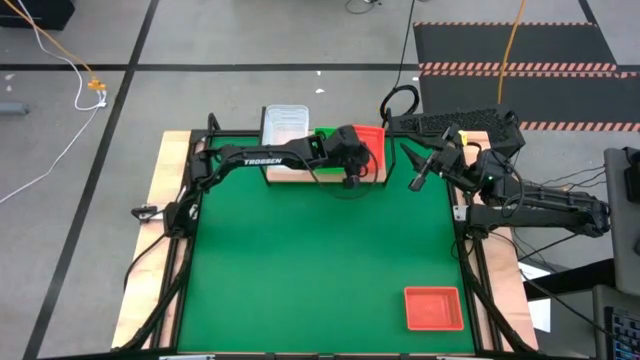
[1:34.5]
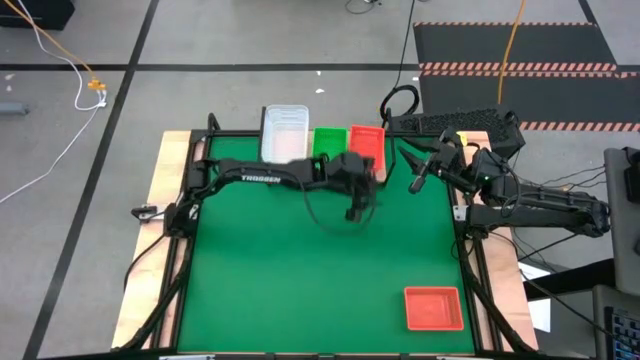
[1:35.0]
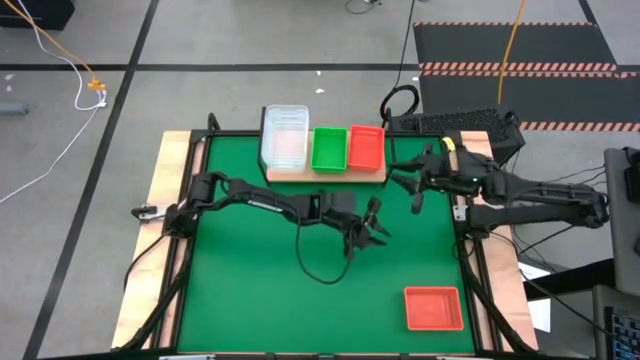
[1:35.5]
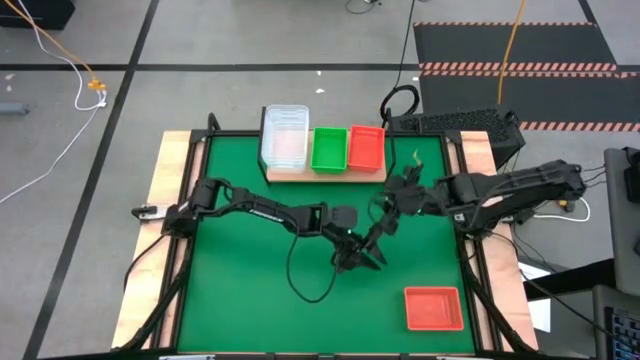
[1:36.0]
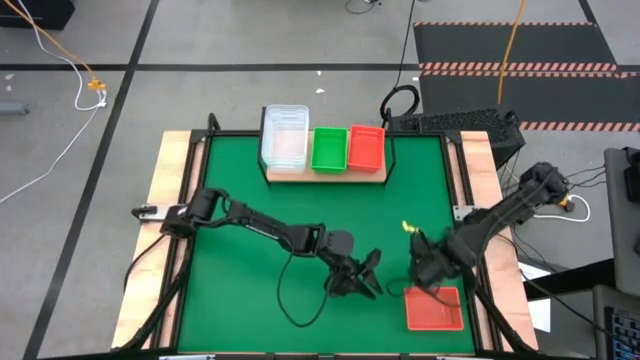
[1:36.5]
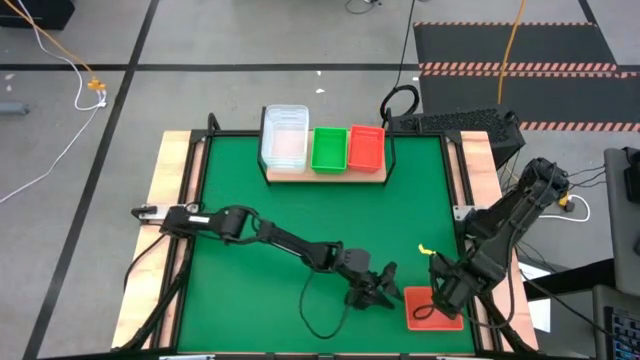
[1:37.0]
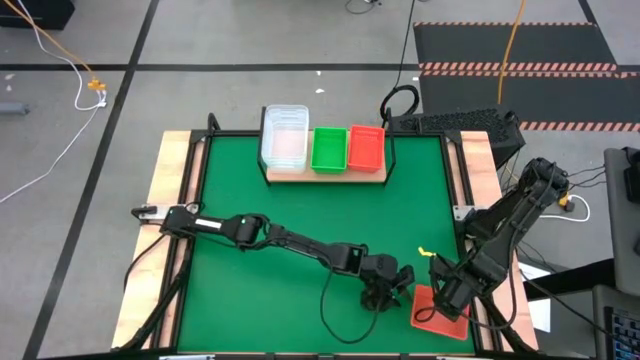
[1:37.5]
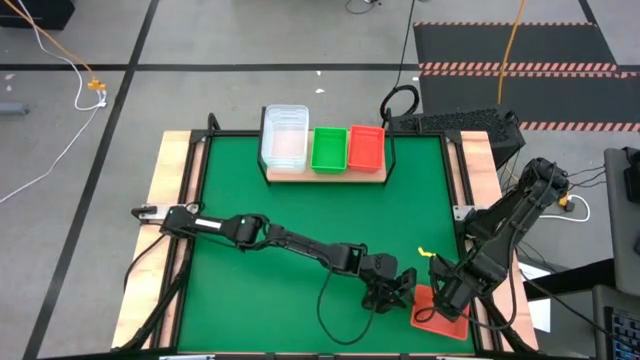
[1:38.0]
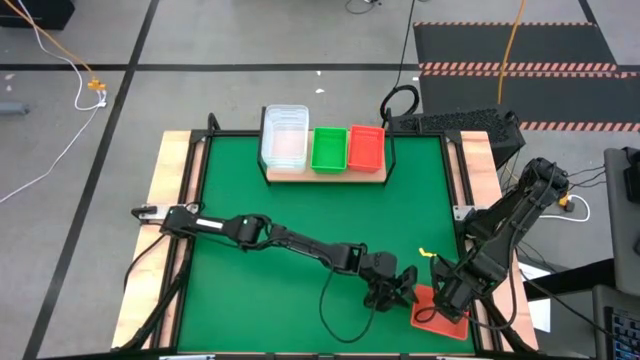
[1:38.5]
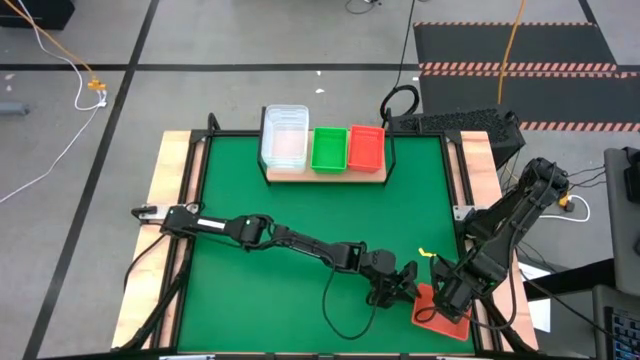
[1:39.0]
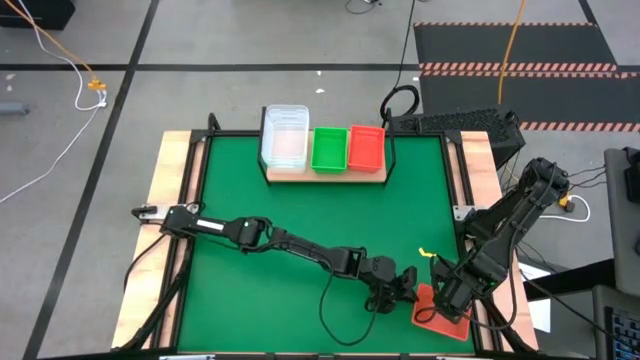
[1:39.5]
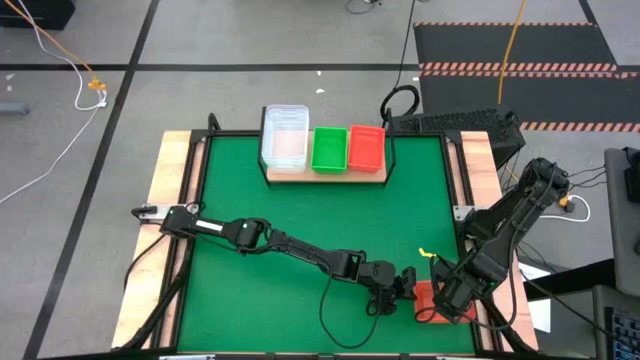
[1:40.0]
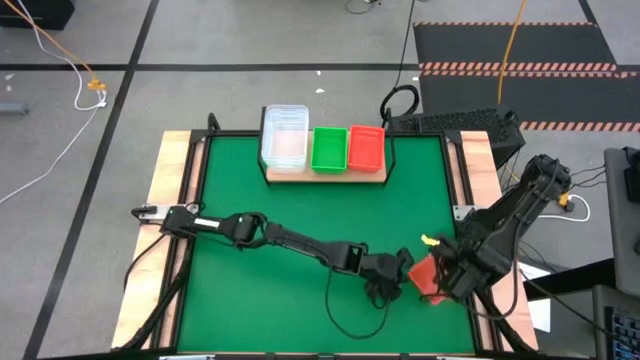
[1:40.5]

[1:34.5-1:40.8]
Task: Stack baskets on shelf by color
Stack the orange bin on the top of the other orange bins on the shelf

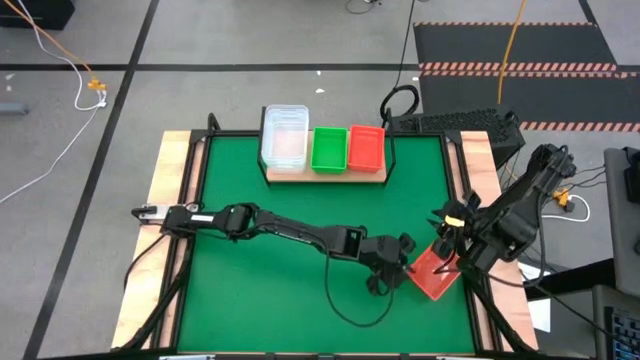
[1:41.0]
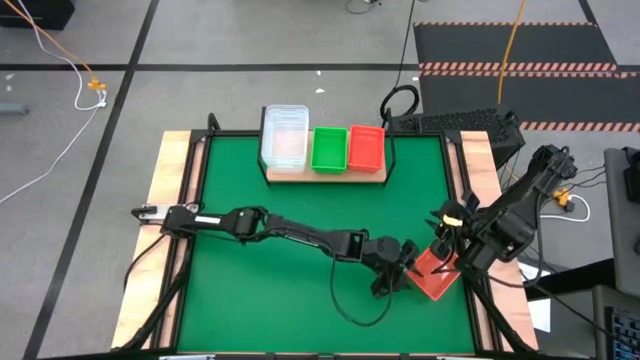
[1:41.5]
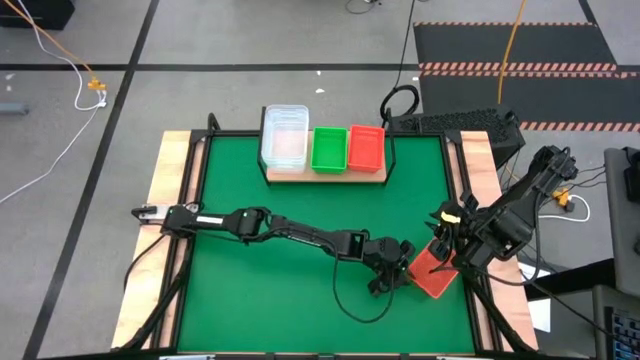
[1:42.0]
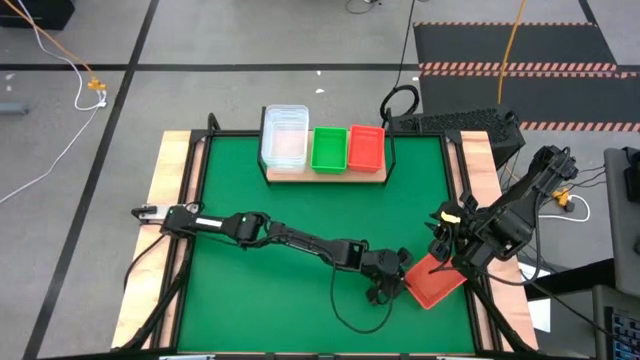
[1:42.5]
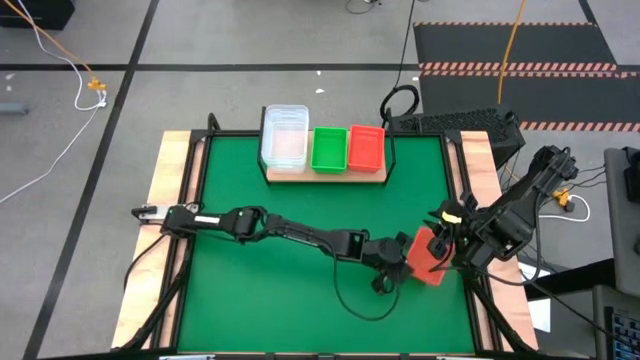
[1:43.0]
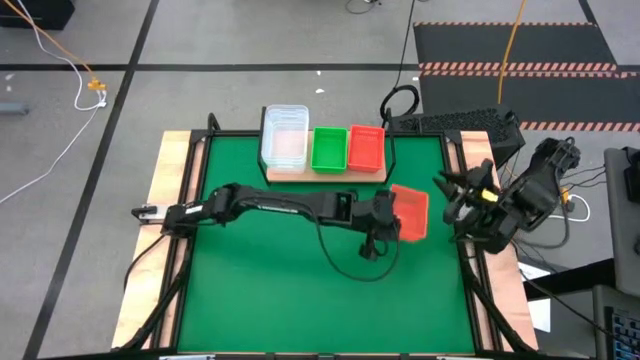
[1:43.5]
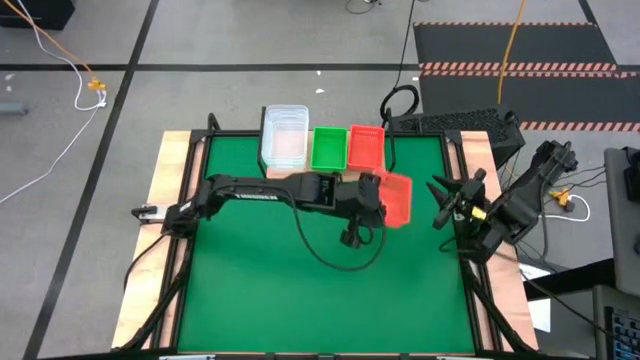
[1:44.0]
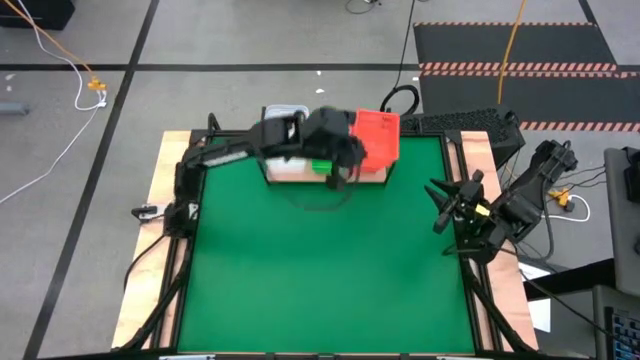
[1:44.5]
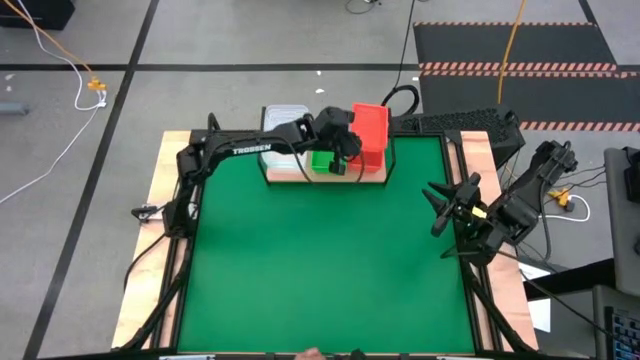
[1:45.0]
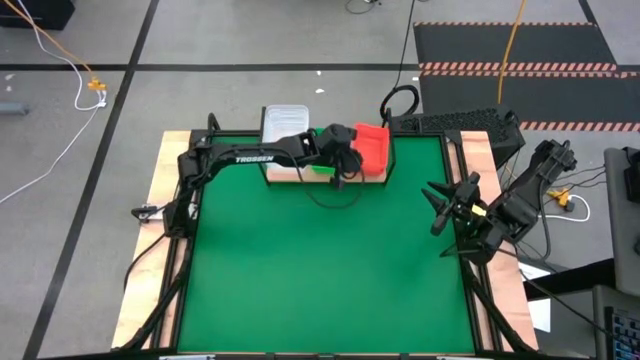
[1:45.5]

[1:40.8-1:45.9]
Stack the orange bin on the top of the other orange bins on the shelf

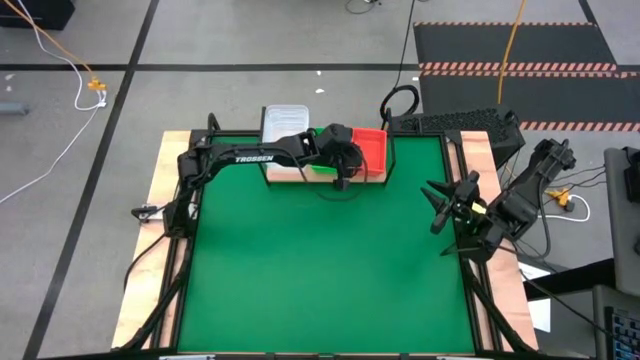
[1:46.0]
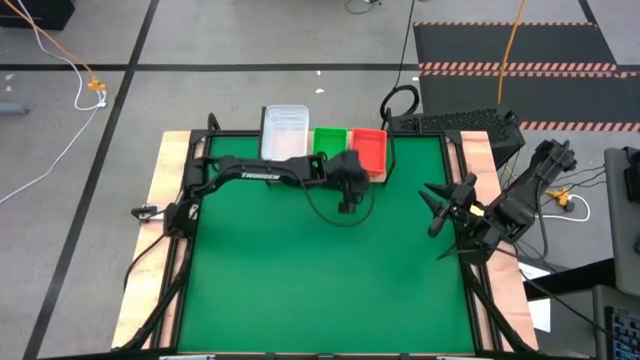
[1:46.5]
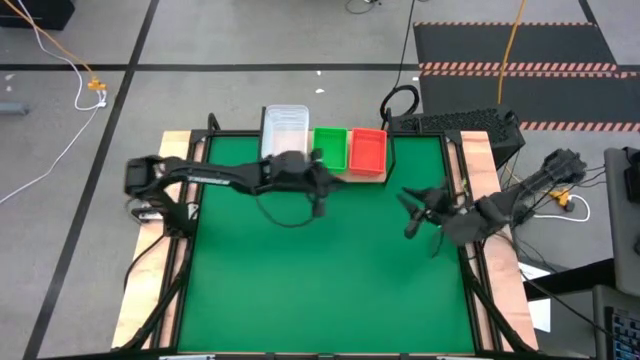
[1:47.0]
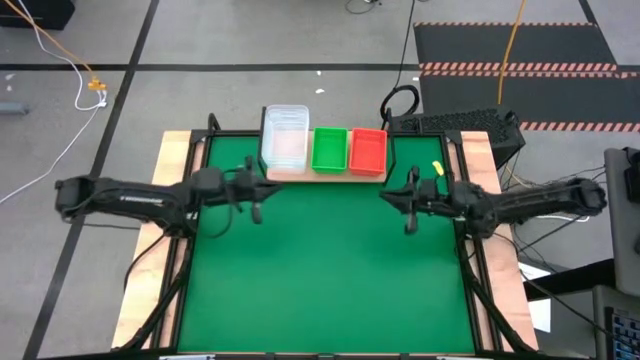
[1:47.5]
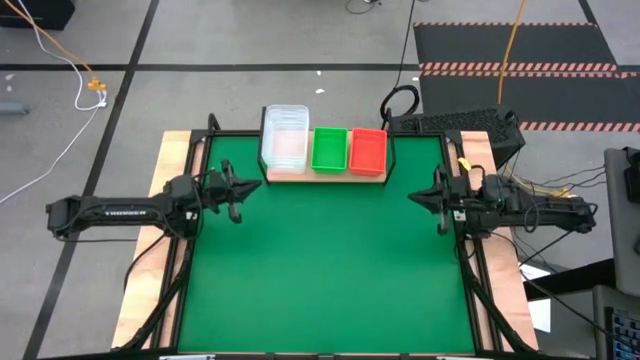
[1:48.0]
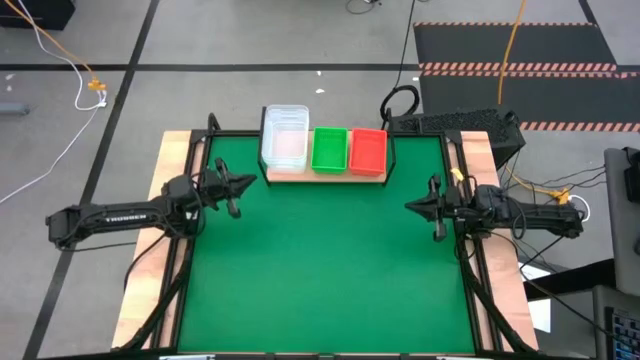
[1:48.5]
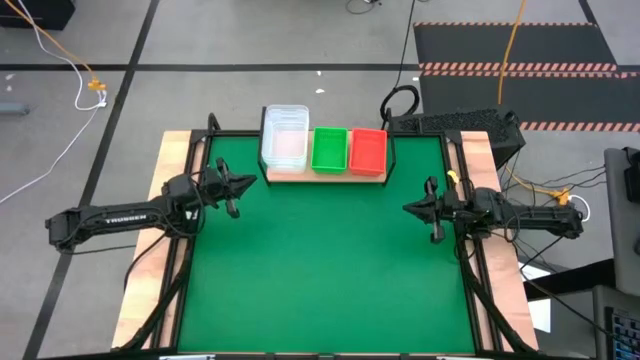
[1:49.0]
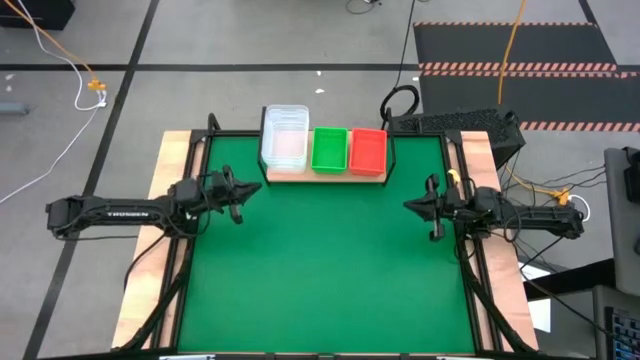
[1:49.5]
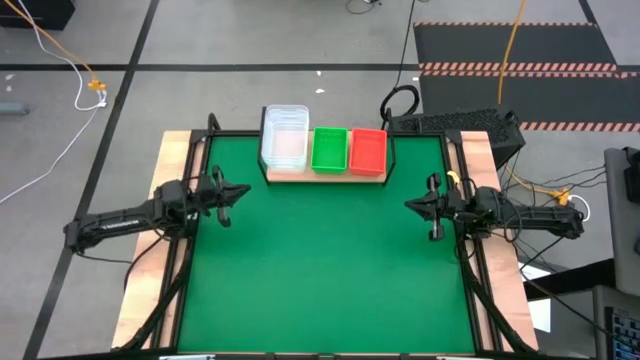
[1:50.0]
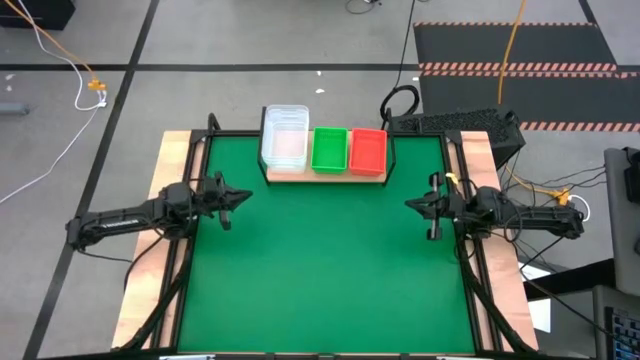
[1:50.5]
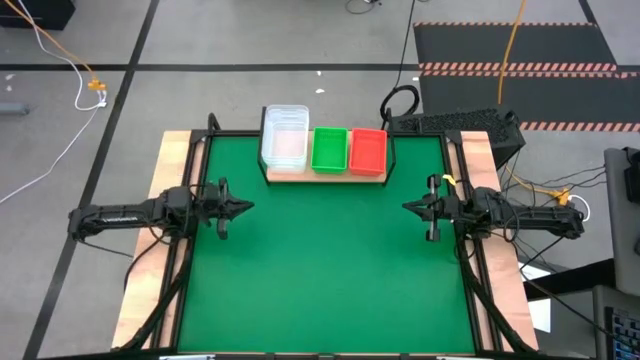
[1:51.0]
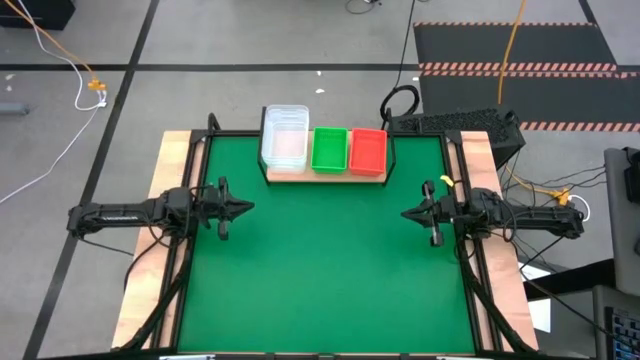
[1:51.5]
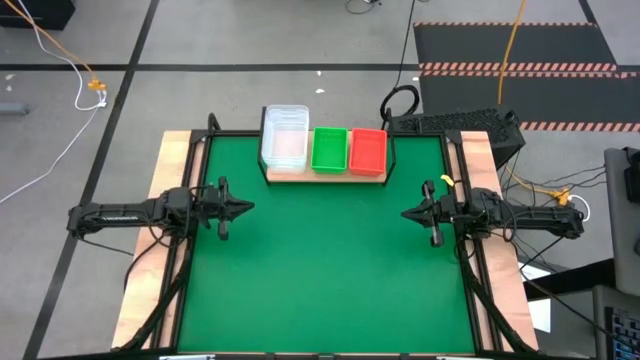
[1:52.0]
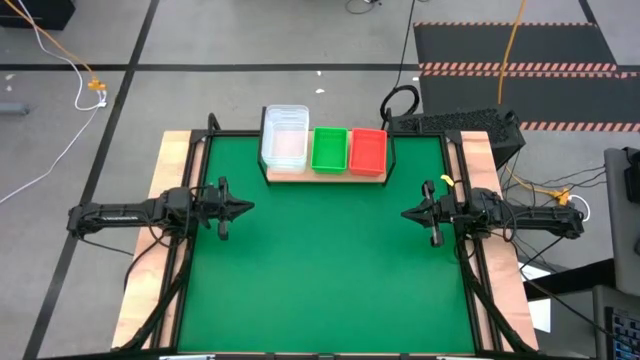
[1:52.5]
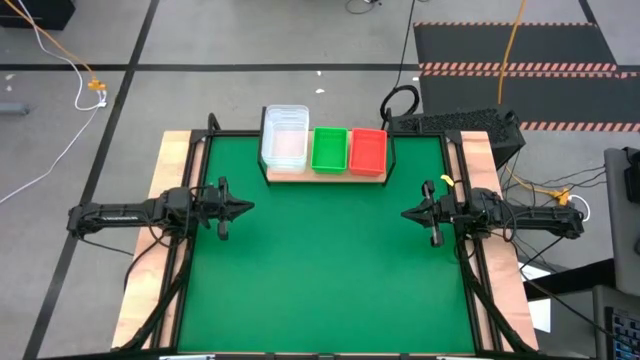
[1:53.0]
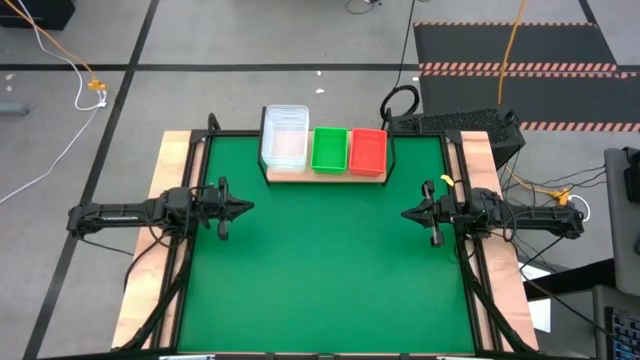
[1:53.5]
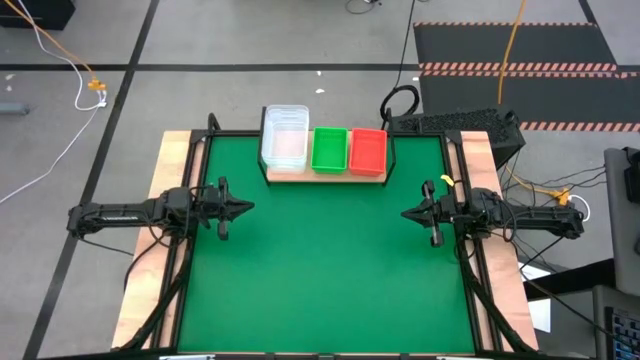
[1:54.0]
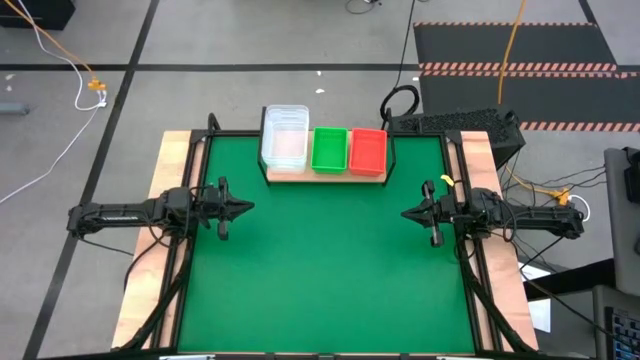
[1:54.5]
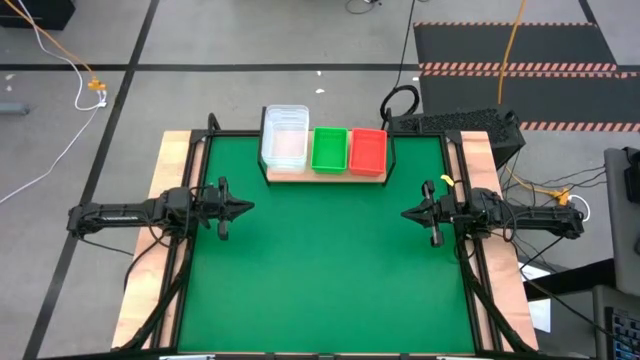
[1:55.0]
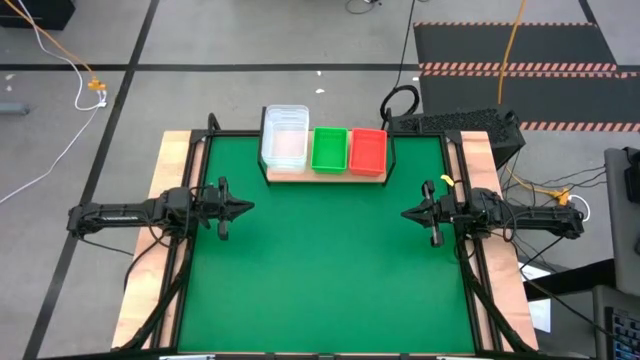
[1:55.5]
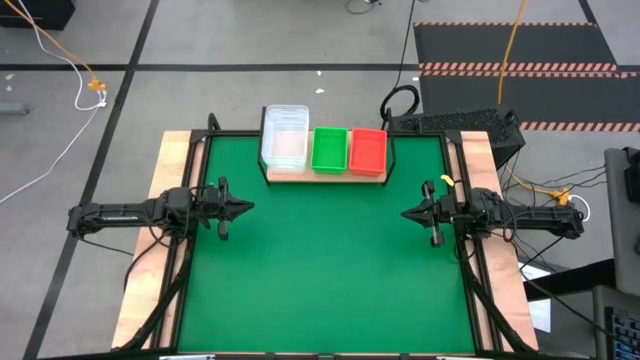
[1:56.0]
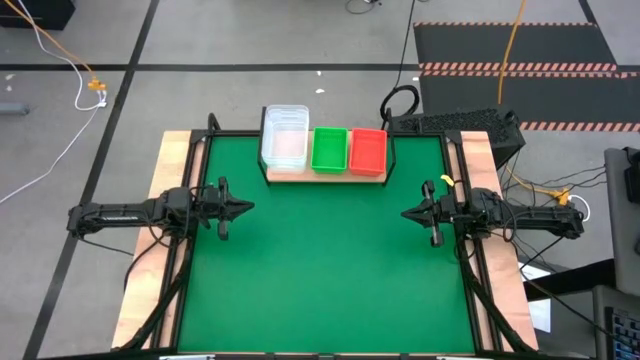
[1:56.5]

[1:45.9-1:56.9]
Return to Home Position
